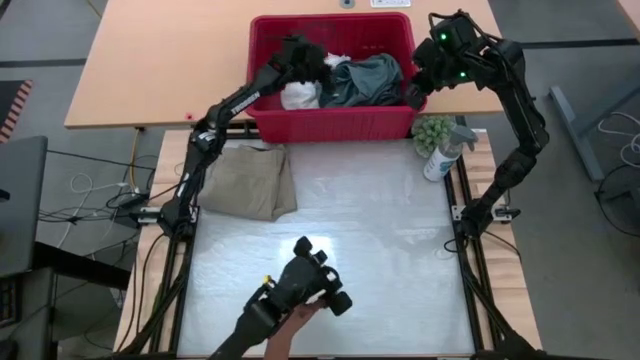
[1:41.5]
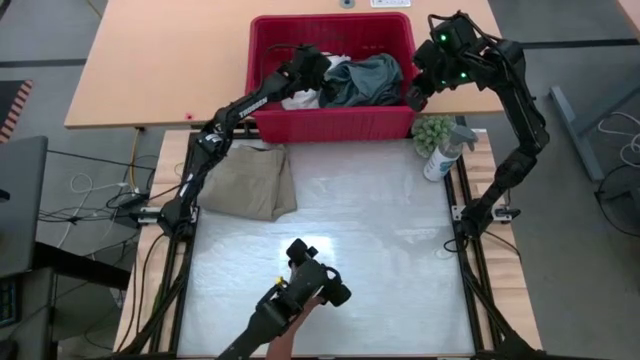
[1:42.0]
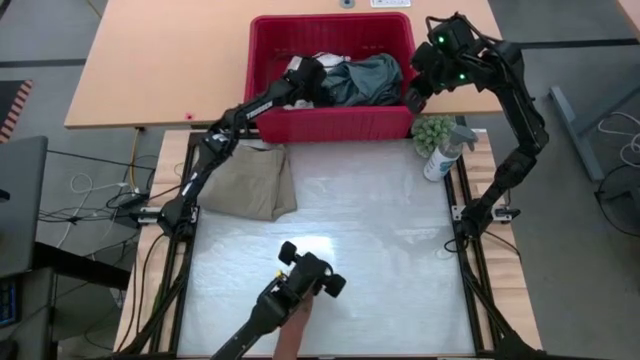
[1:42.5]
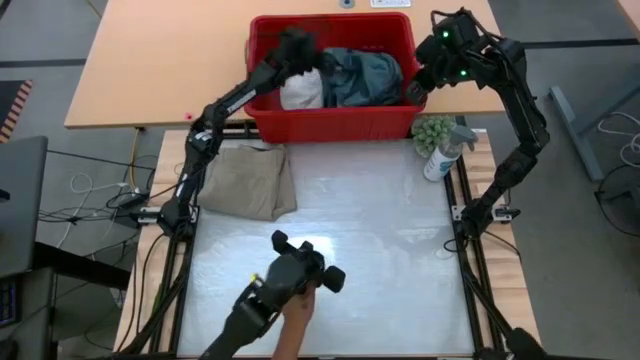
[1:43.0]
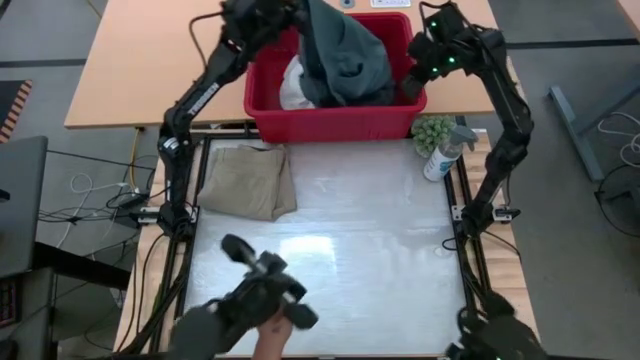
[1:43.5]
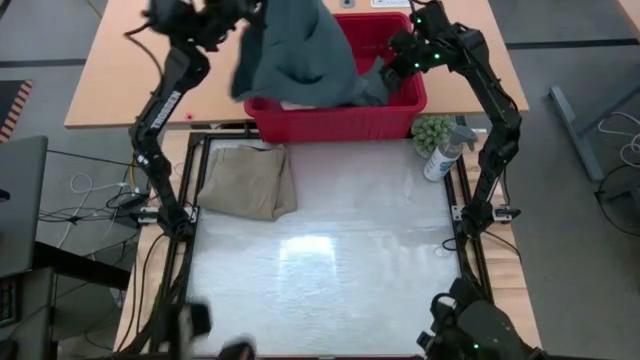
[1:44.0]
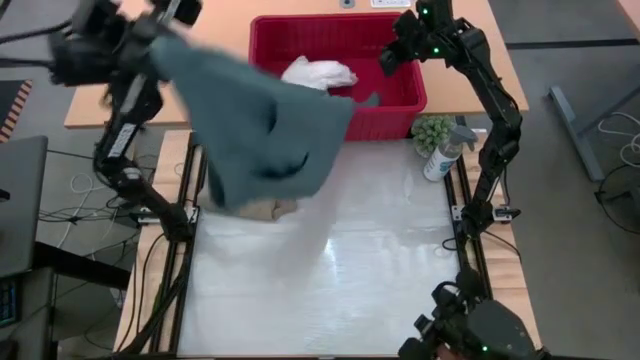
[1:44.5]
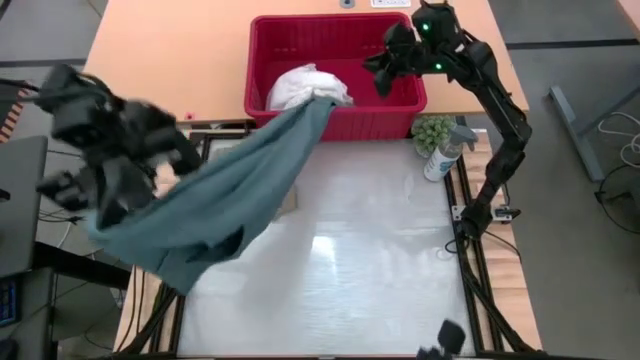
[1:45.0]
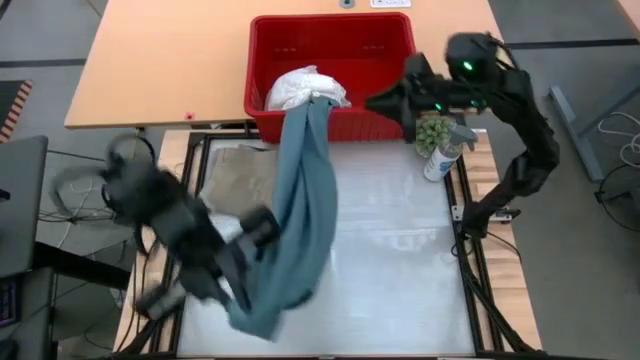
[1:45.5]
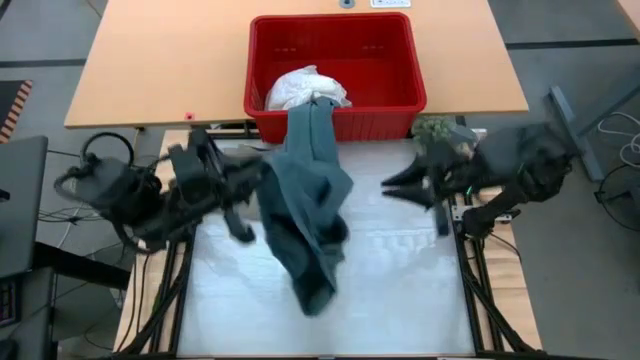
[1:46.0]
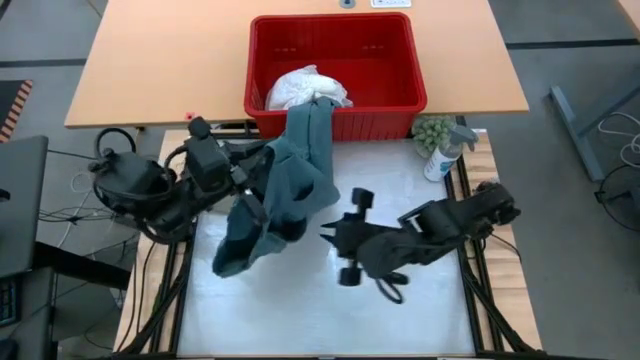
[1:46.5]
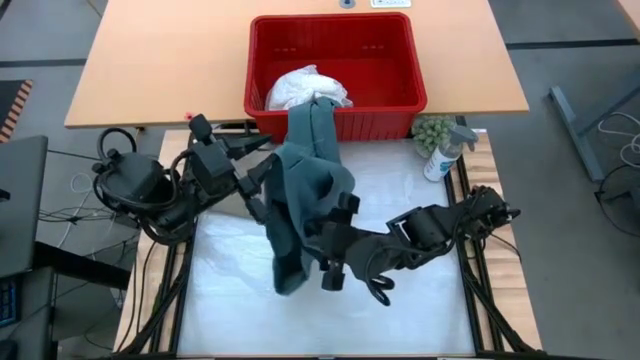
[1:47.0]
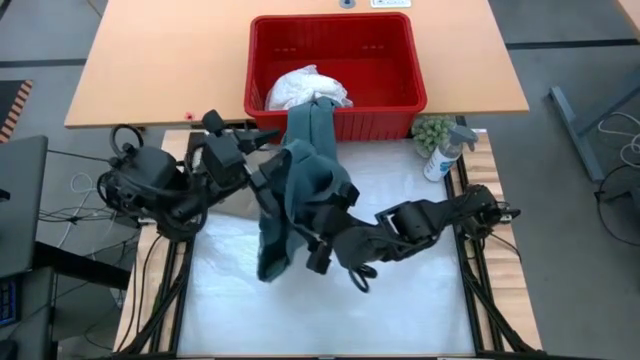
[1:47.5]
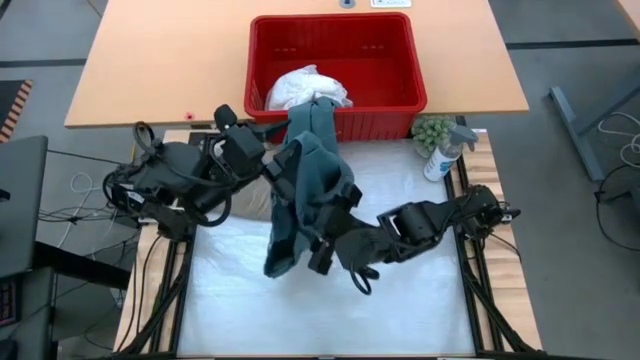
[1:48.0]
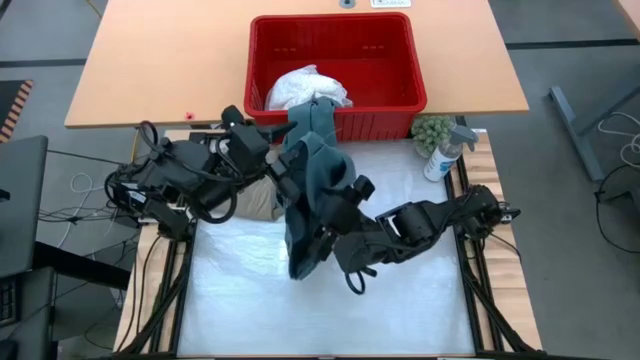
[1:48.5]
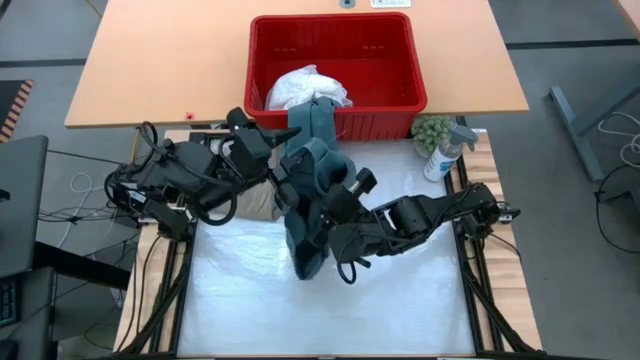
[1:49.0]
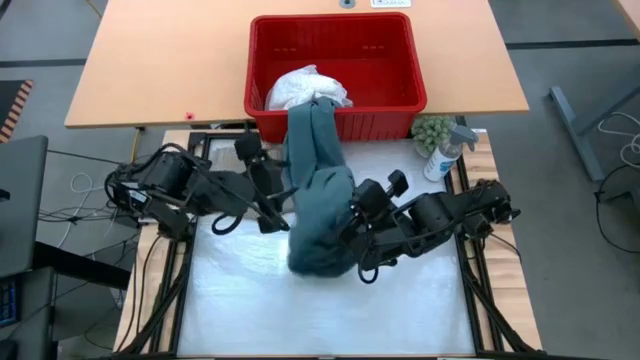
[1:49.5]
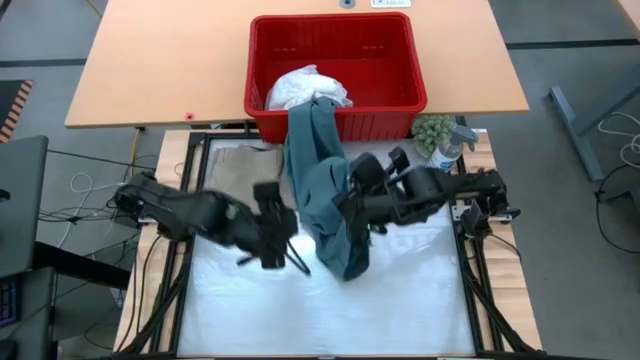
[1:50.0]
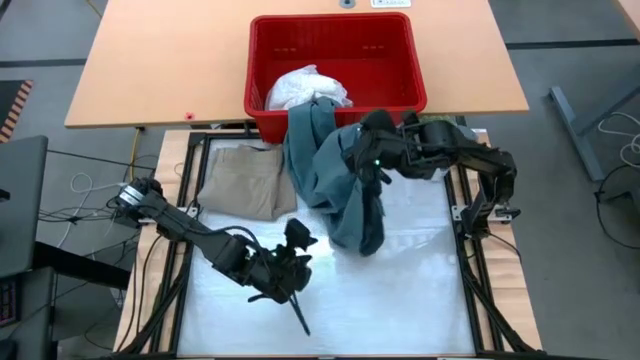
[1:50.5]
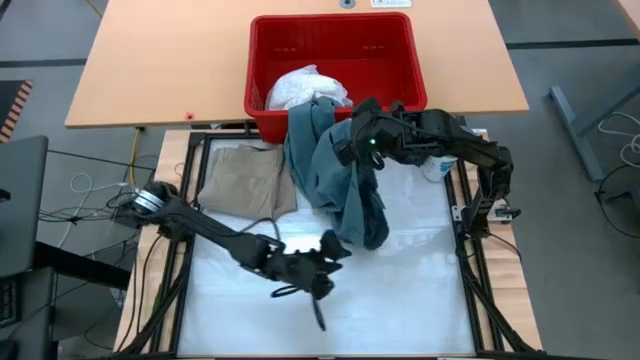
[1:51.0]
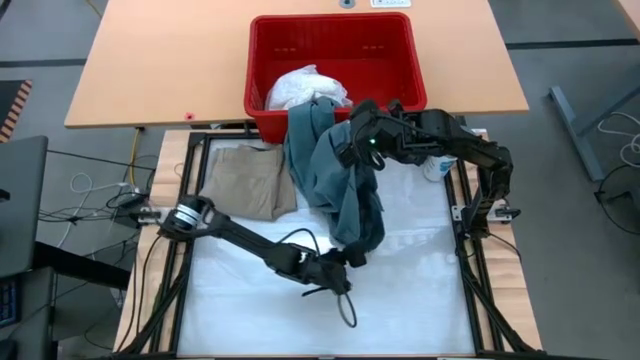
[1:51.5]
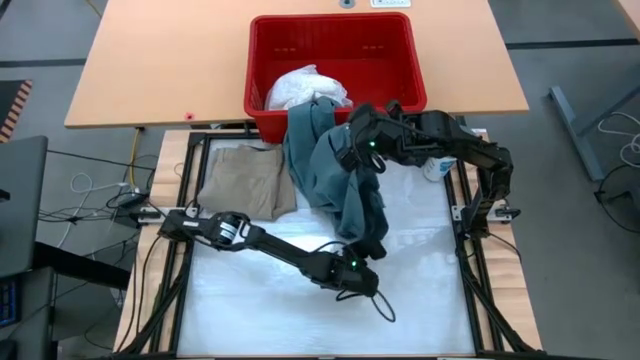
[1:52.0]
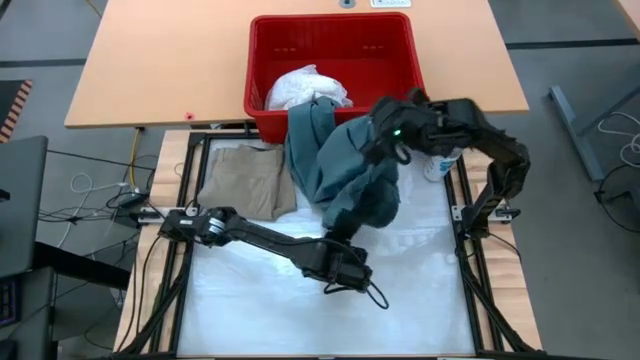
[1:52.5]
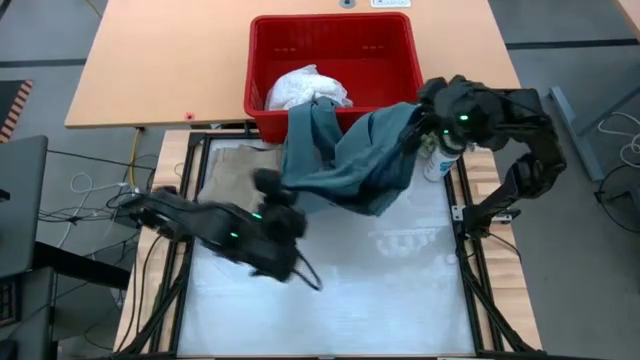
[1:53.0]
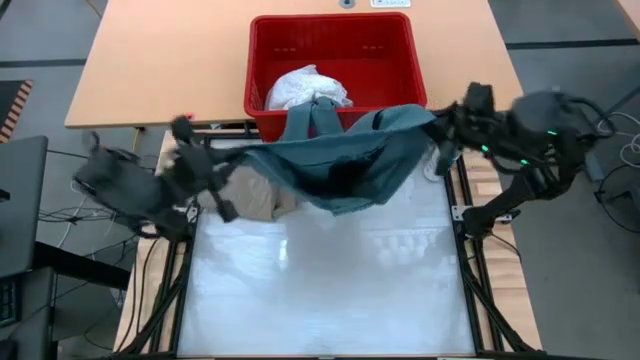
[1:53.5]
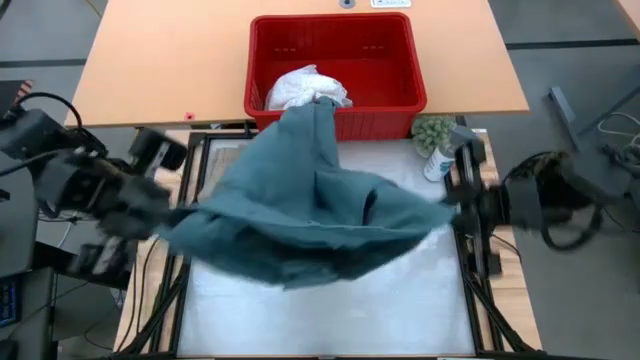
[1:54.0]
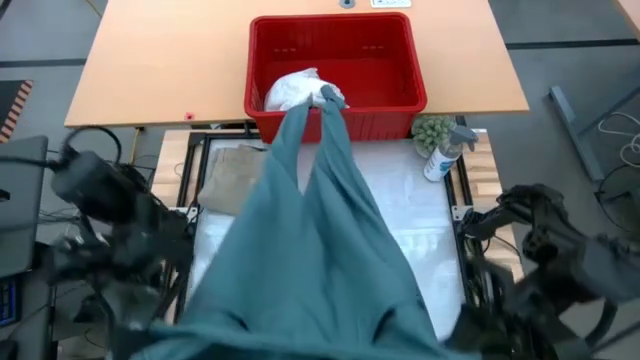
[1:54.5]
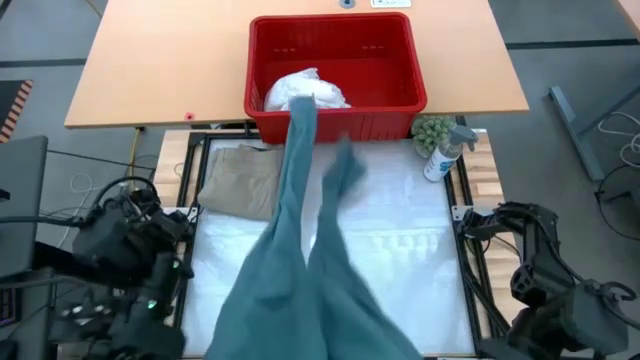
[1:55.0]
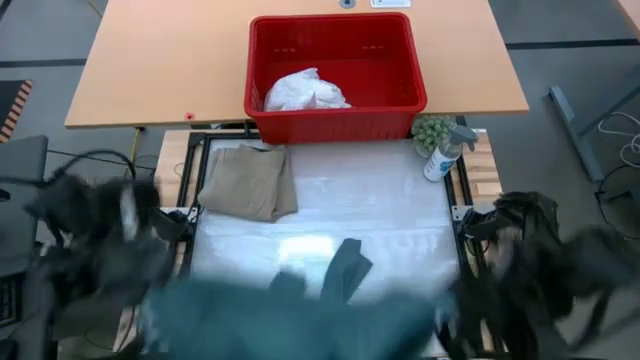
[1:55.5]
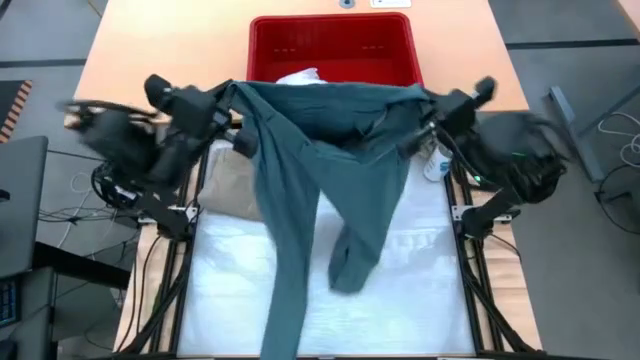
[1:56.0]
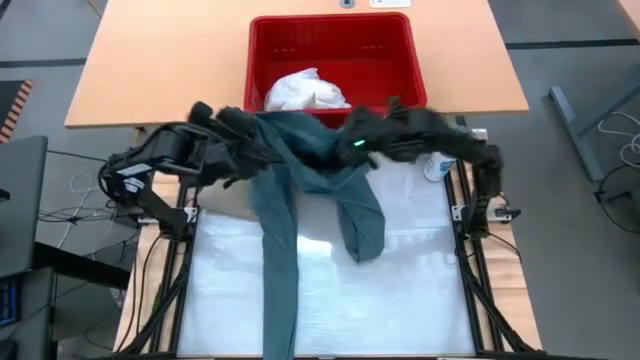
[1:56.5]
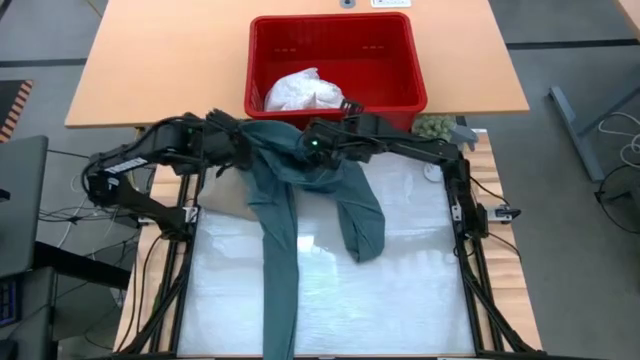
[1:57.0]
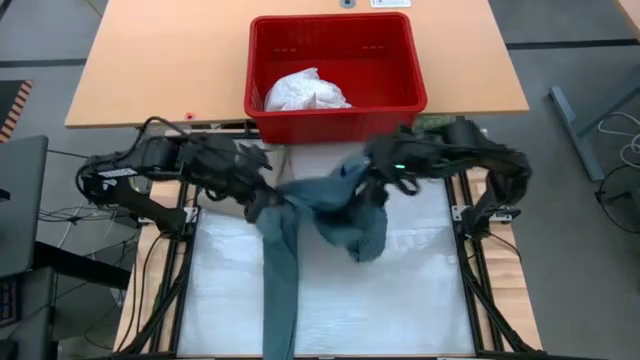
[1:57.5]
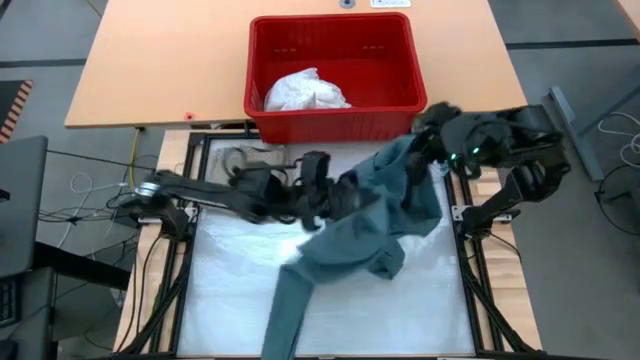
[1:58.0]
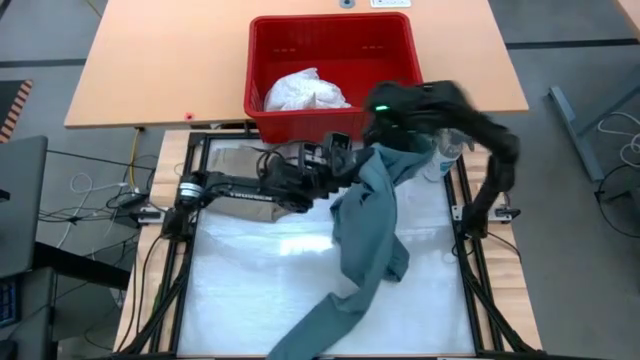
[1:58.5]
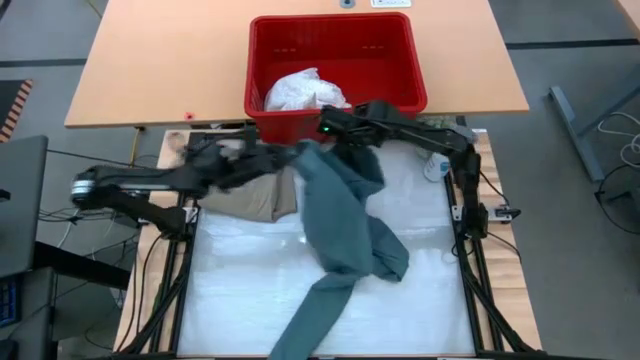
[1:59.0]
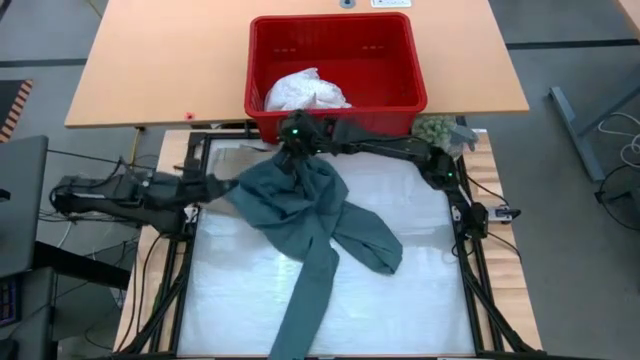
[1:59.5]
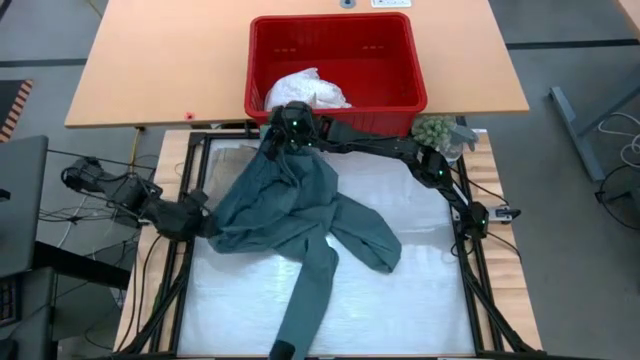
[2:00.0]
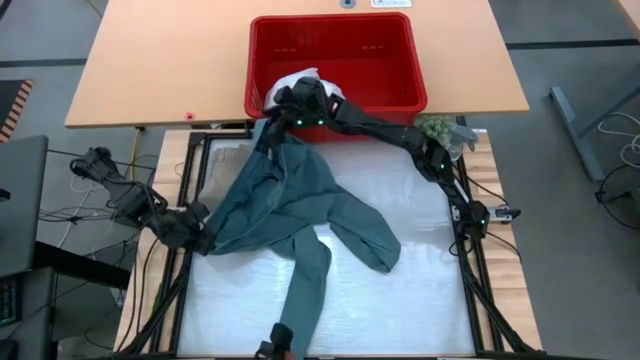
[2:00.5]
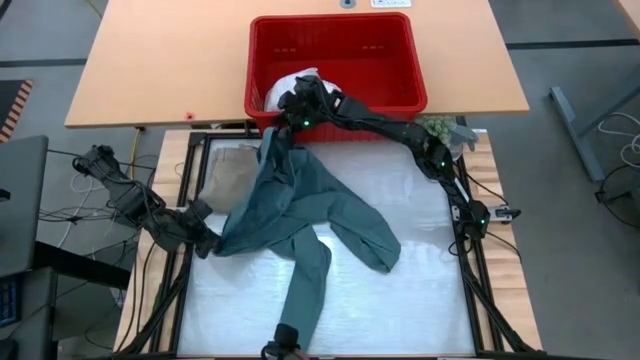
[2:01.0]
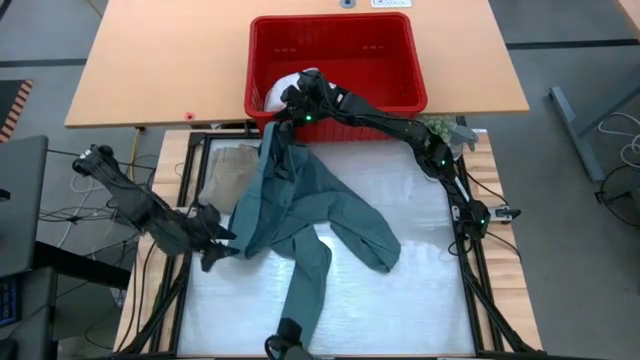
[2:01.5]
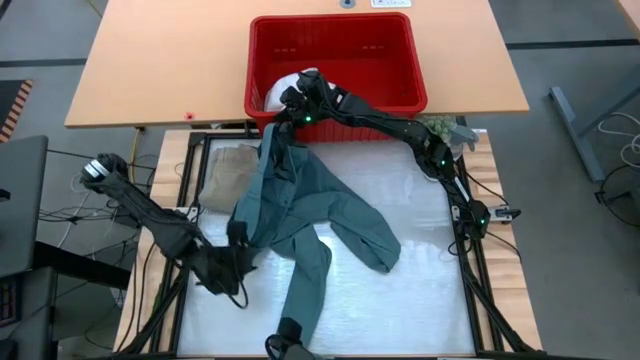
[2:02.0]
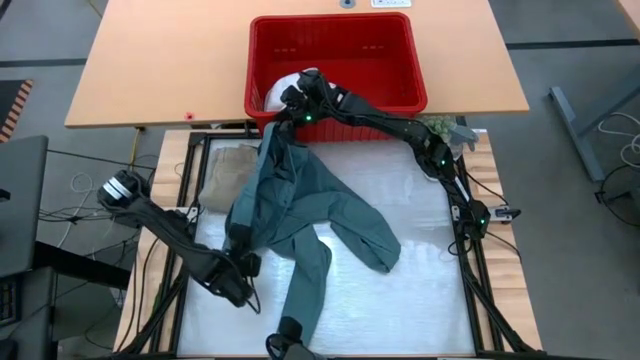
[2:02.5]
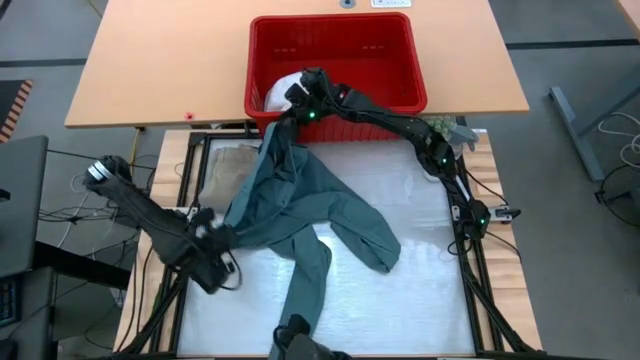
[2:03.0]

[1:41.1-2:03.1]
Task: Fold Laundry from Bin
Fold the blue pants in the red bin
